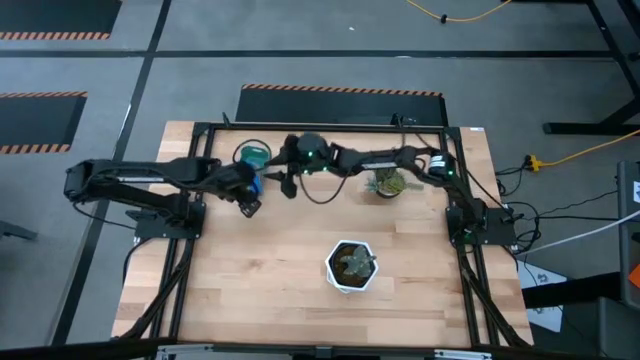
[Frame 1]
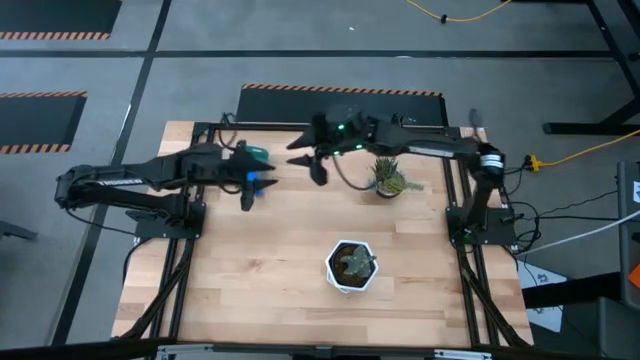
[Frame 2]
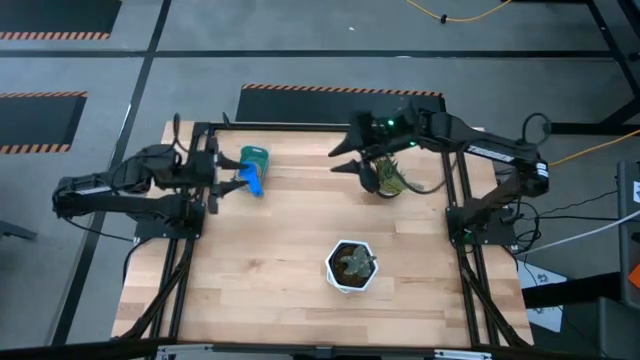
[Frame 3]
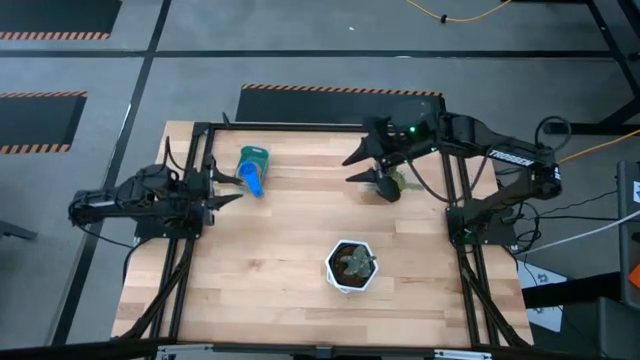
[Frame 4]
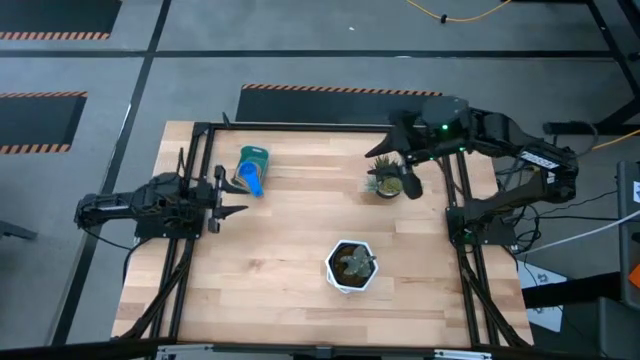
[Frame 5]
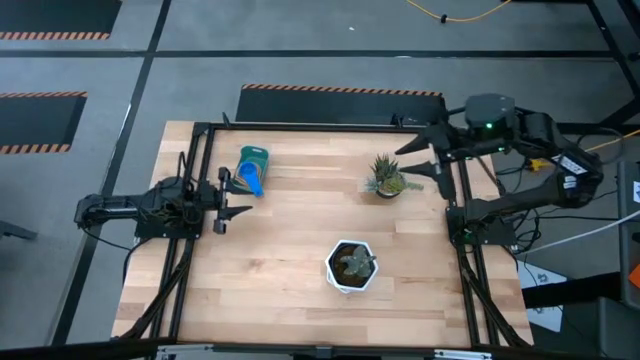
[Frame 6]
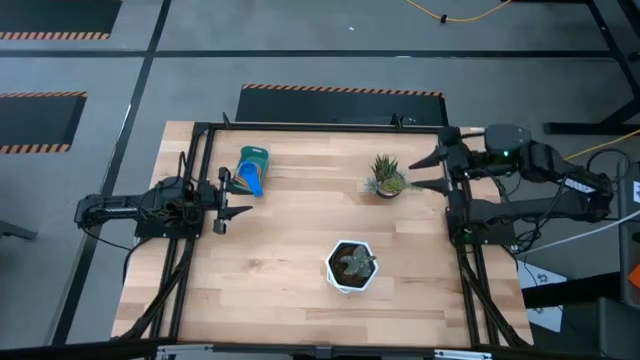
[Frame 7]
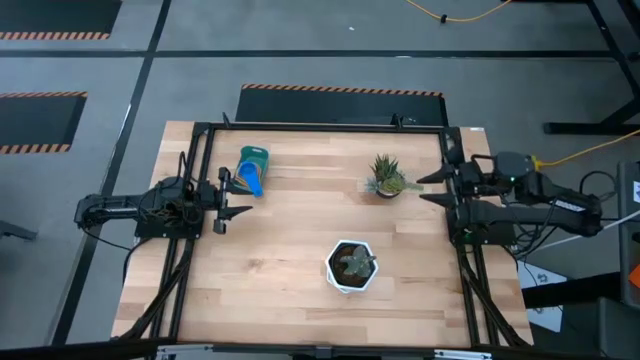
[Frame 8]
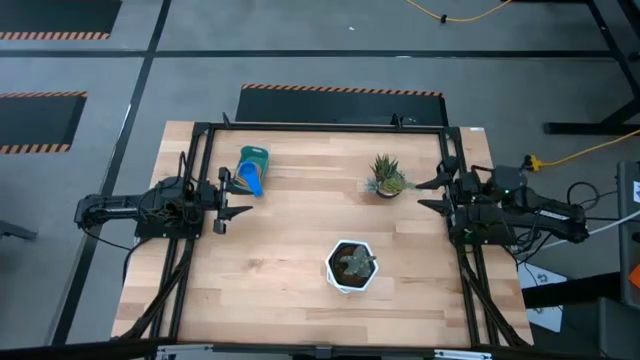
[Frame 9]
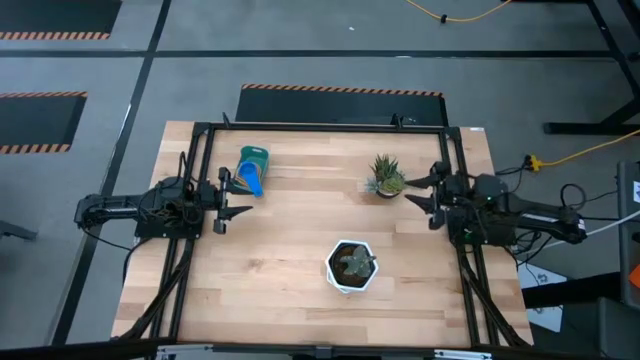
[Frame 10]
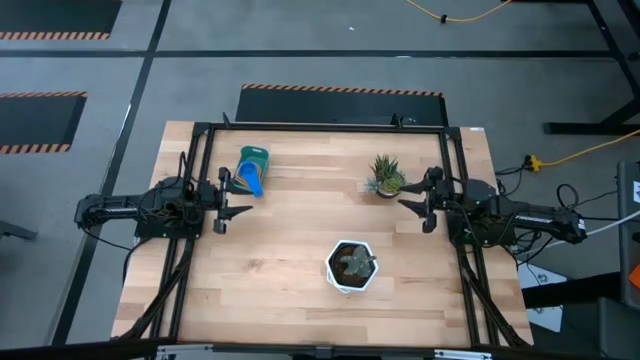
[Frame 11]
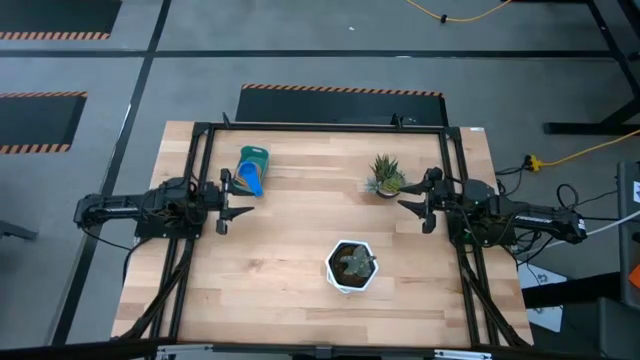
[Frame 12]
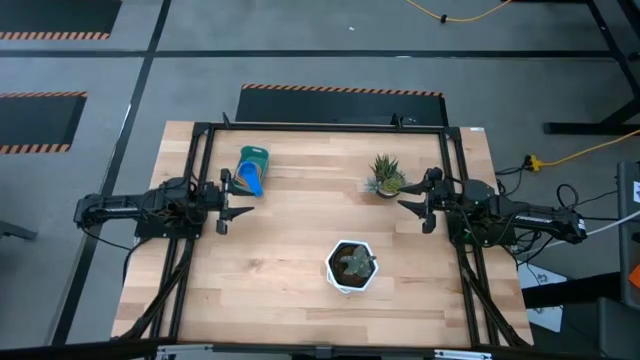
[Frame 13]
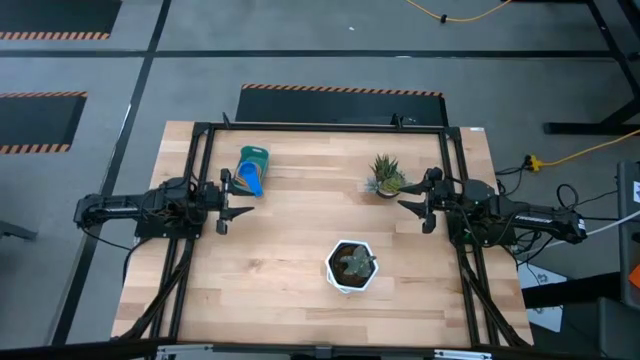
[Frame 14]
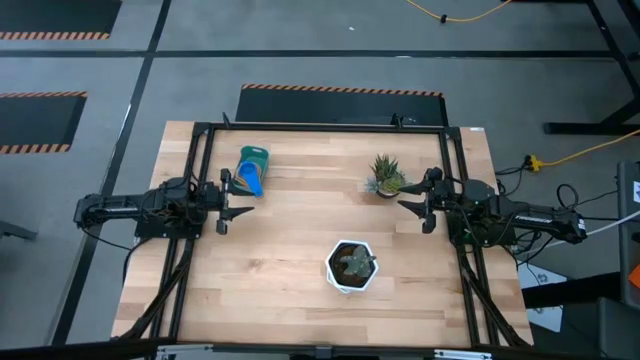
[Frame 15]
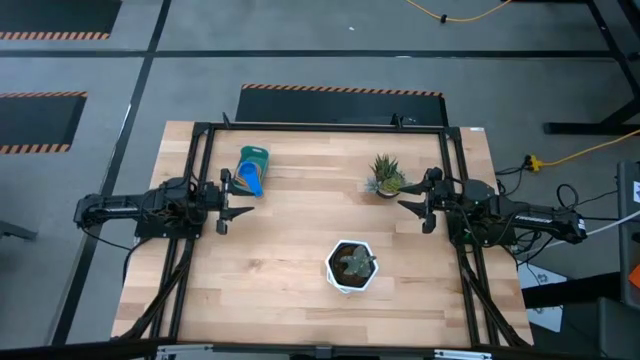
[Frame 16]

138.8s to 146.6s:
Task: Nest measuring cups in basket
Return to Home Position

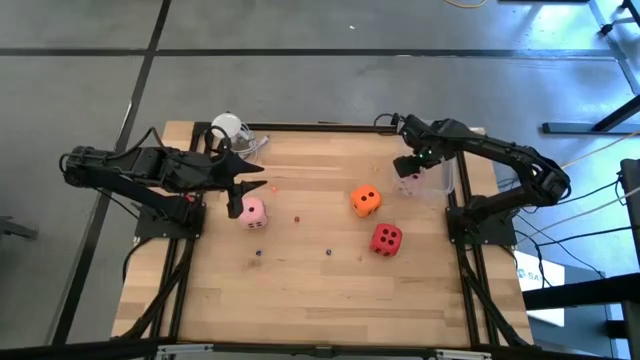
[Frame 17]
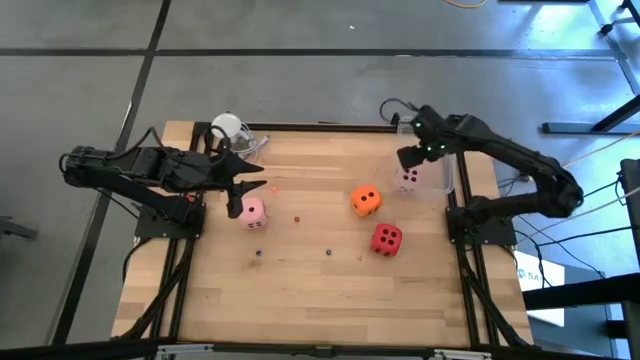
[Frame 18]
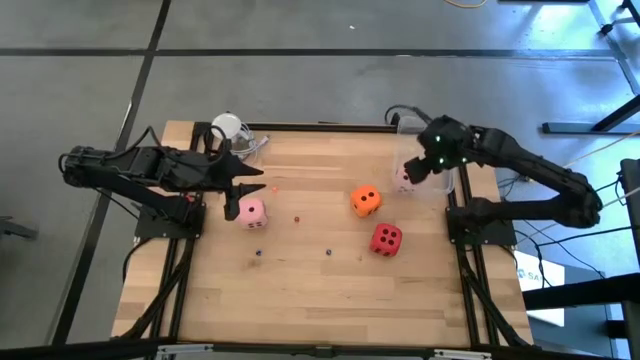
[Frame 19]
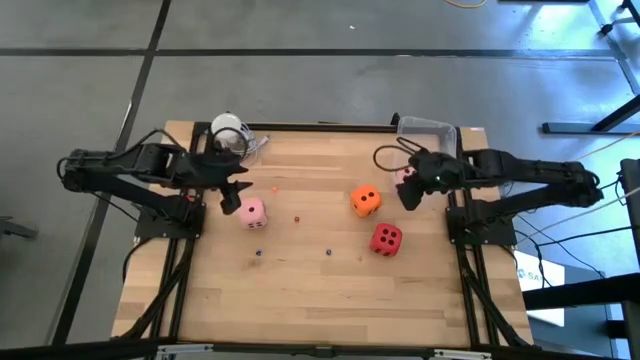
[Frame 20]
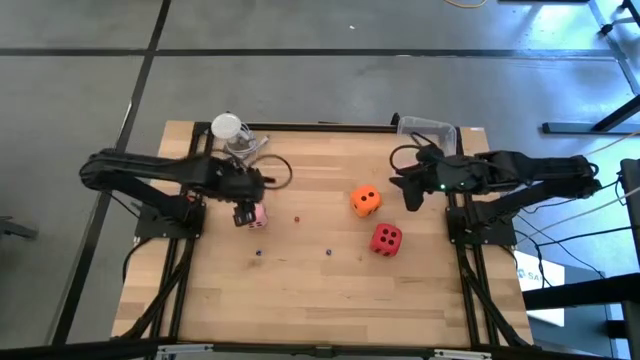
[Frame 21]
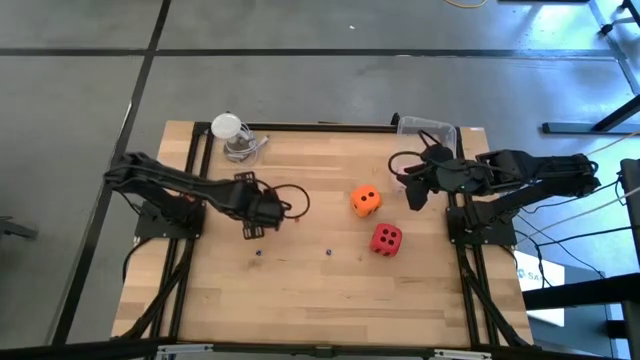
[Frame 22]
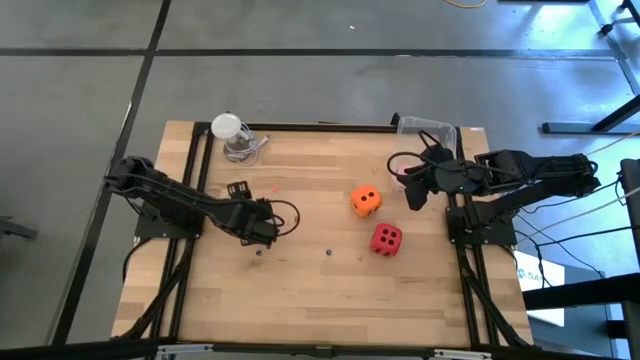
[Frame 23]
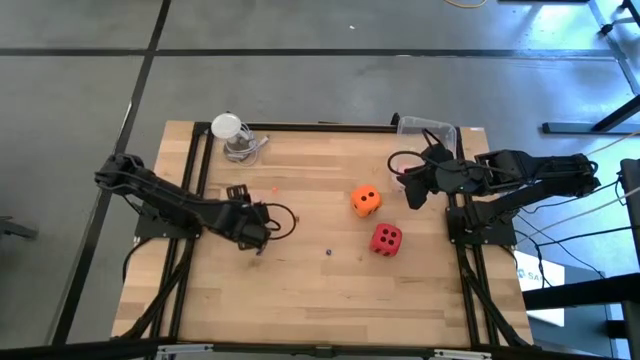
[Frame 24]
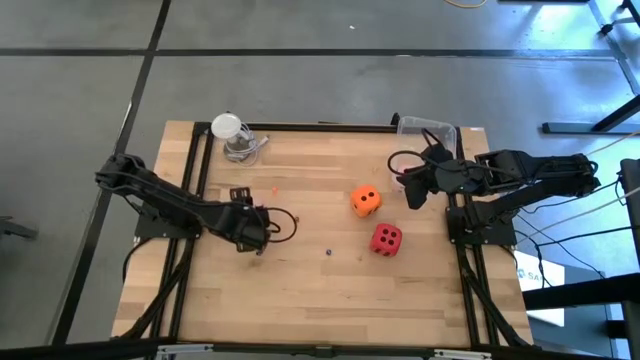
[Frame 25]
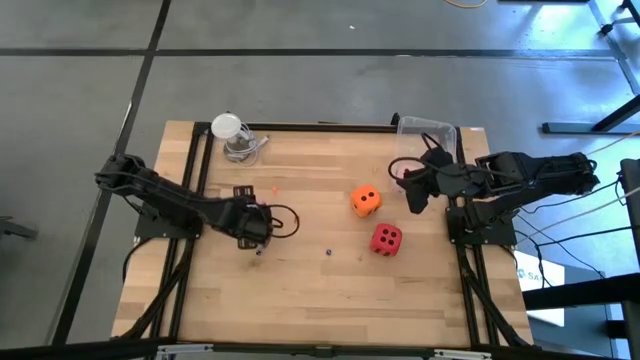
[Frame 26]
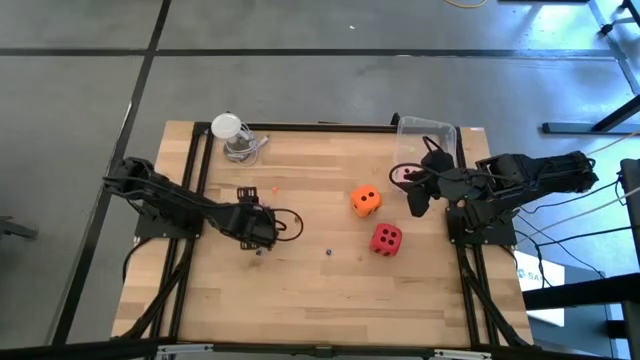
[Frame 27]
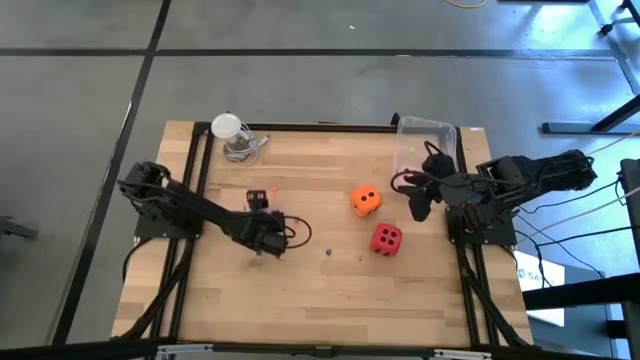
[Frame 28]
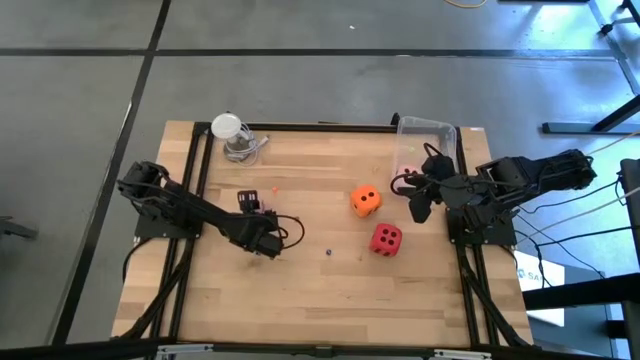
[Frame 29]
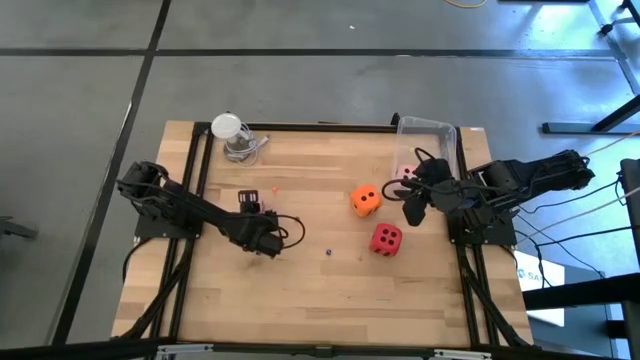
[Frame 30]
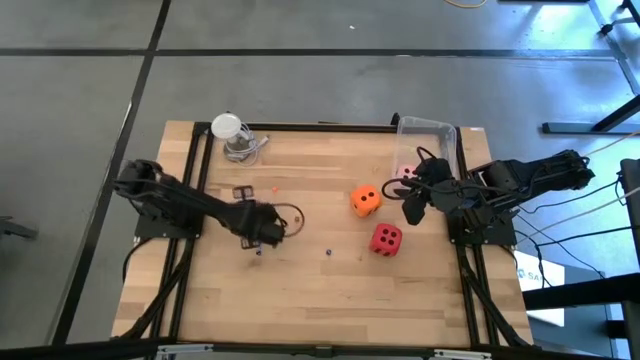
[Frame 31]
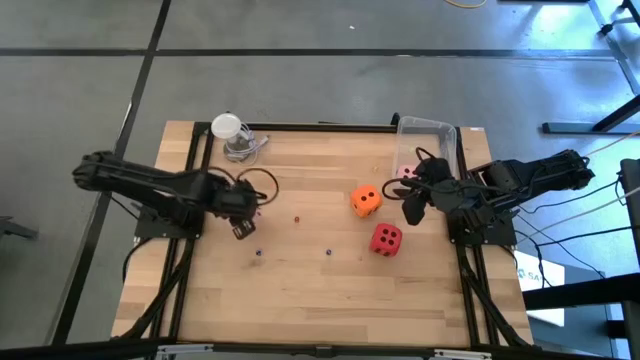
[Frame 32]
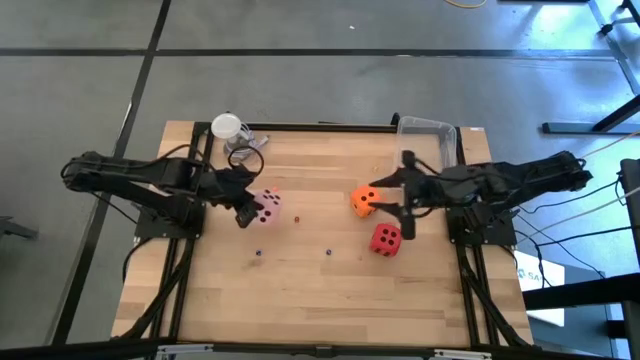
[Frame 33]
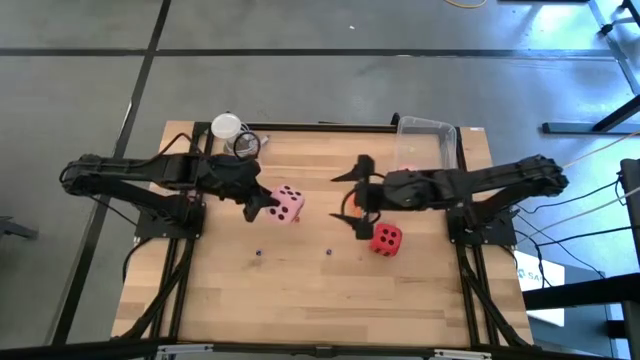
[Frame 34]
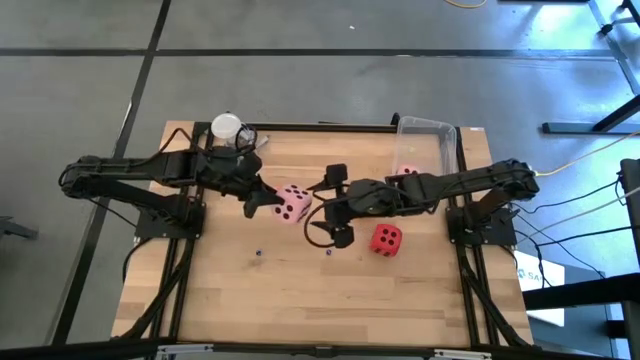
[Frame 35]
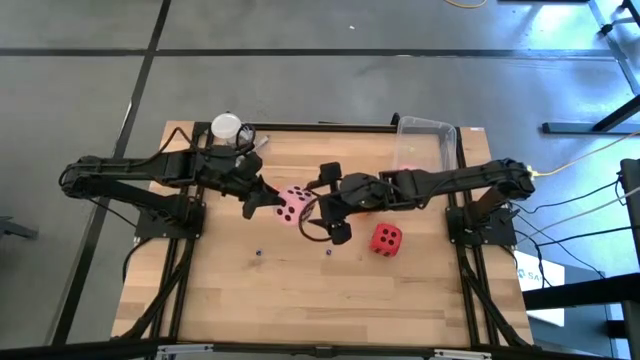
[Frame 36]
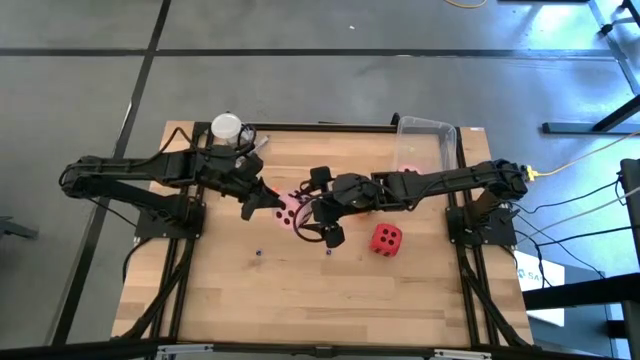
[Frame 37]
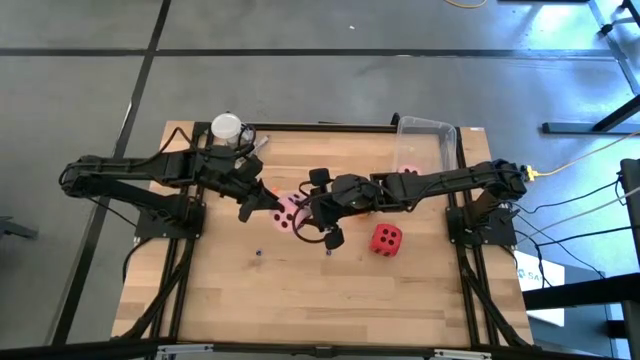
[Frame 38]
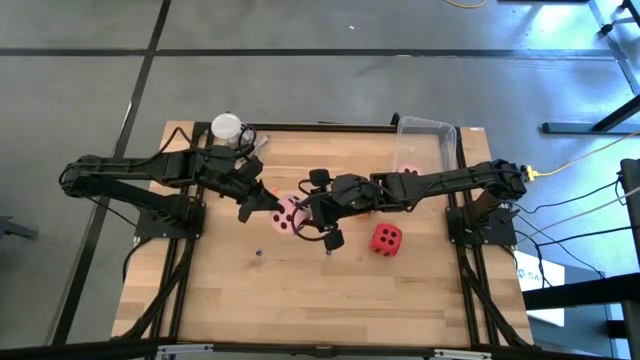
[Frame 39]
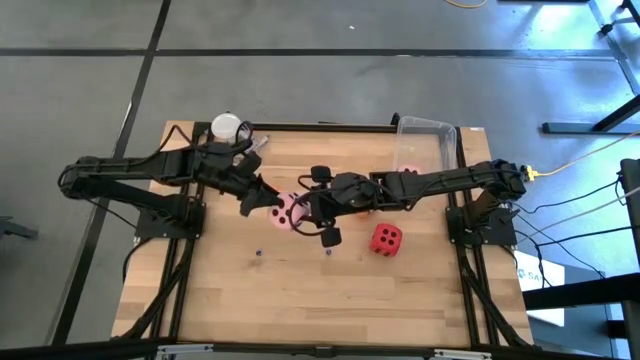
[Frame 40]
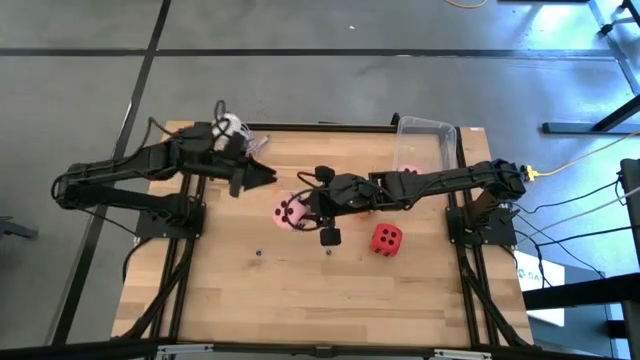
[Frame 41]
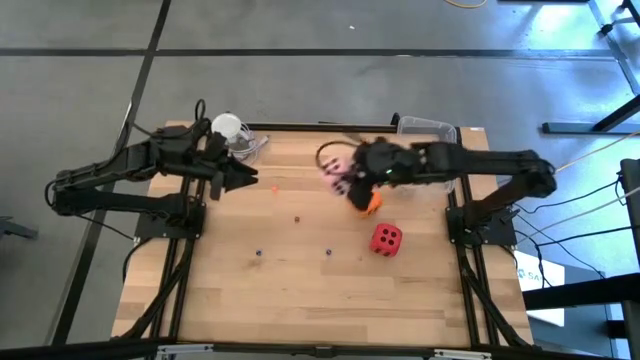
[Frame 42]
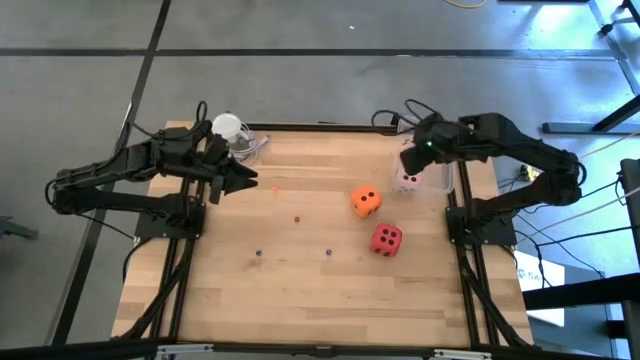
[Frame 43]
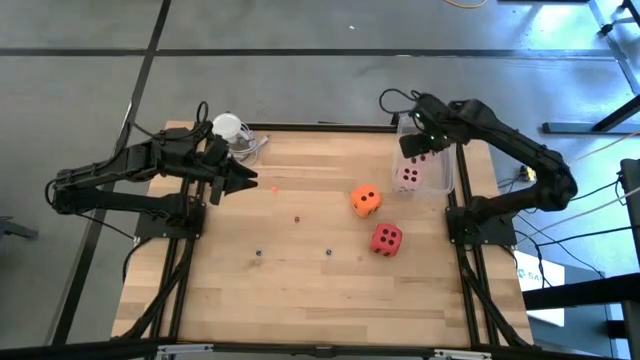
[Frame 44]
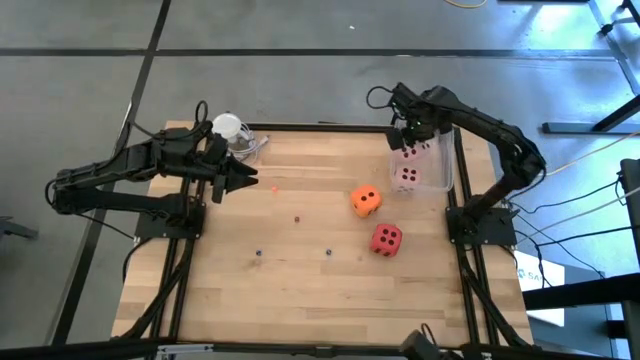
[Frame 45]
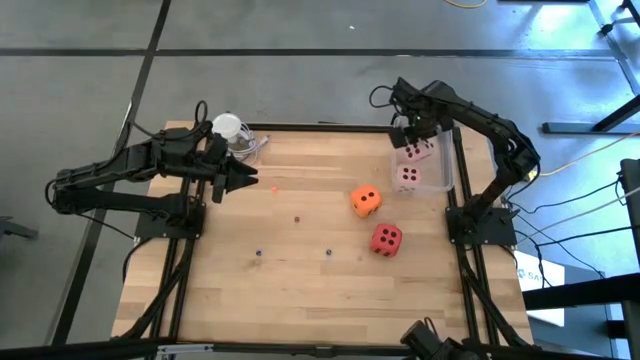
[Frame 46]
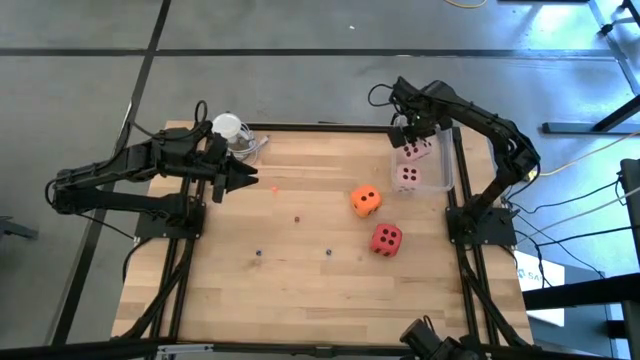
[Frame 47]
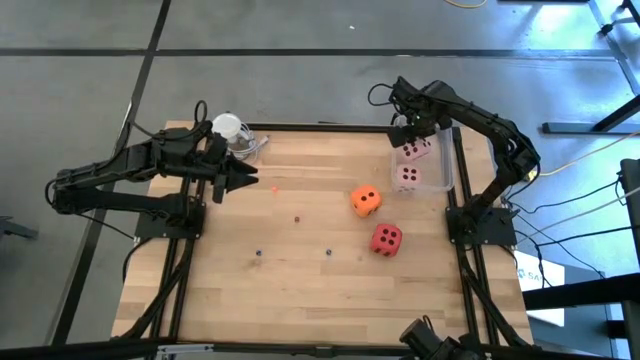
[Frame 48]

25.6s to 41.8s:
Task: Pick & Place Dice
Put the large pink die into the container
